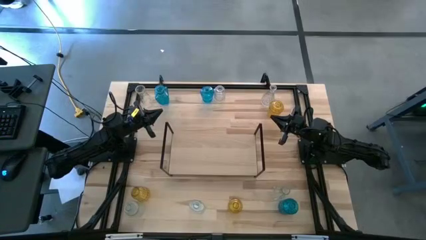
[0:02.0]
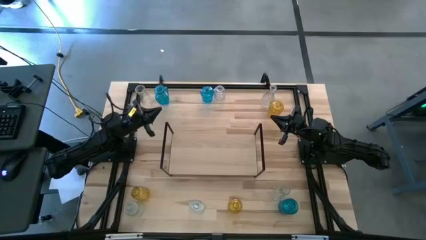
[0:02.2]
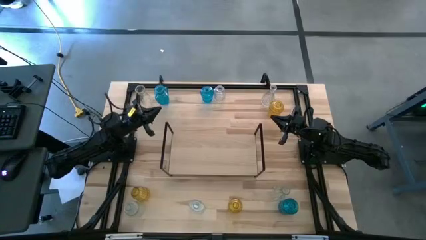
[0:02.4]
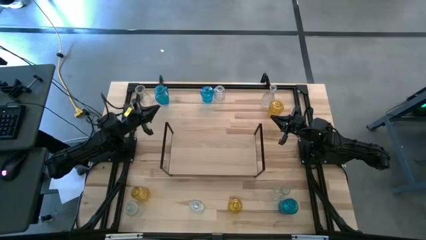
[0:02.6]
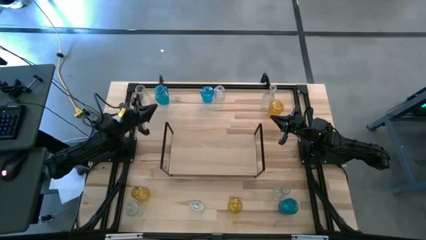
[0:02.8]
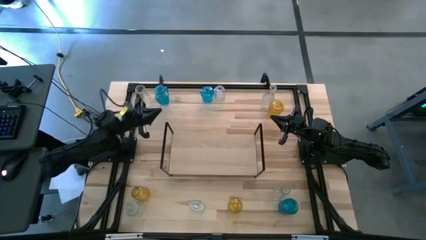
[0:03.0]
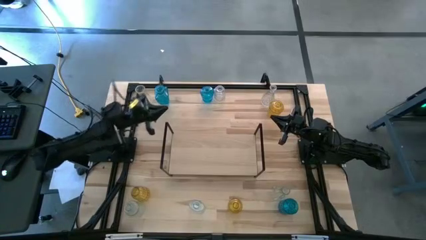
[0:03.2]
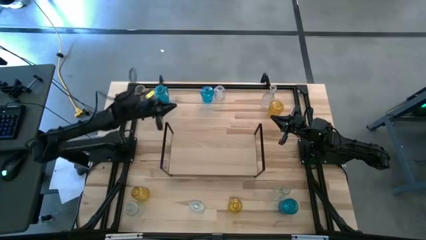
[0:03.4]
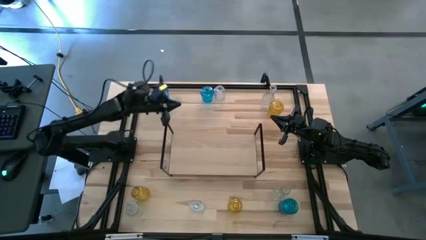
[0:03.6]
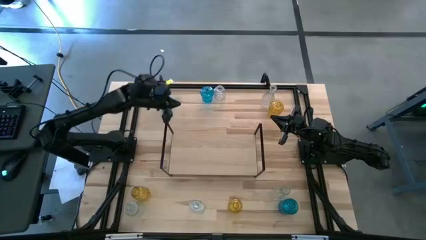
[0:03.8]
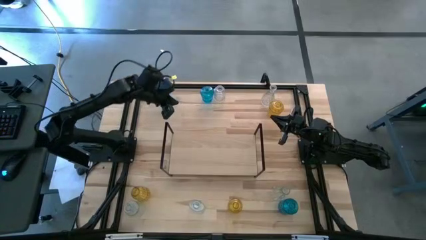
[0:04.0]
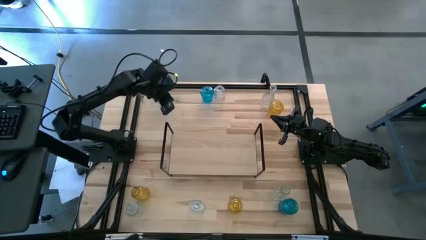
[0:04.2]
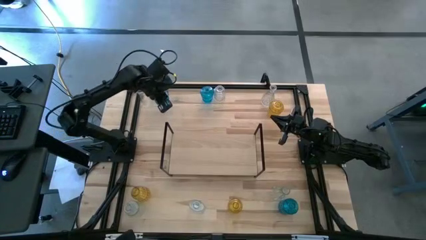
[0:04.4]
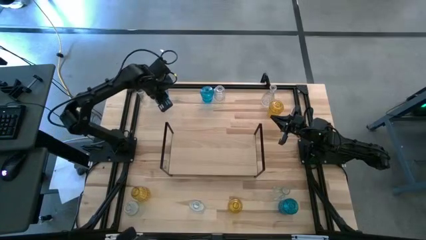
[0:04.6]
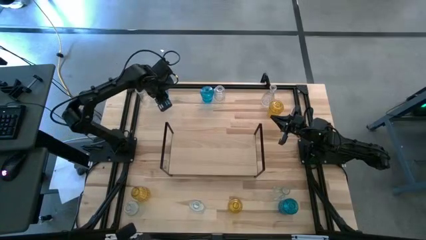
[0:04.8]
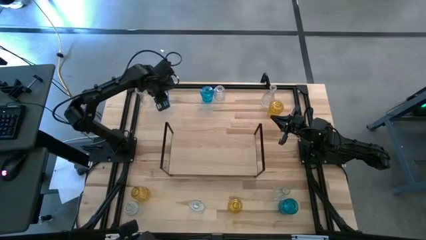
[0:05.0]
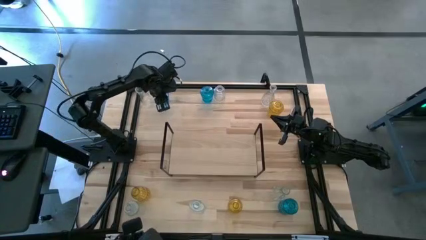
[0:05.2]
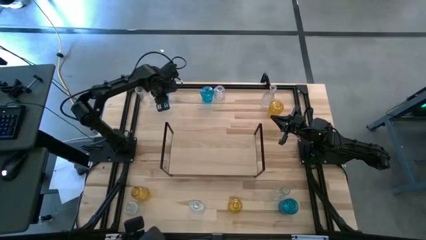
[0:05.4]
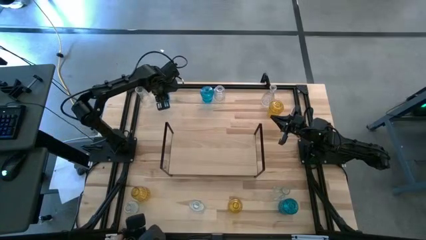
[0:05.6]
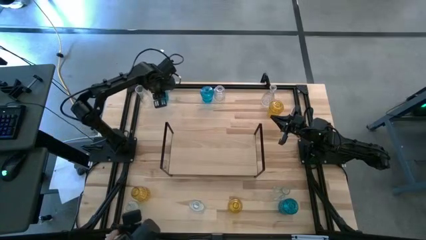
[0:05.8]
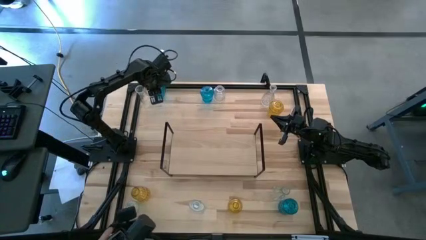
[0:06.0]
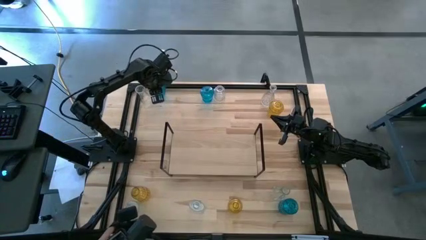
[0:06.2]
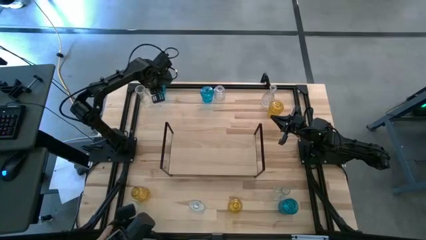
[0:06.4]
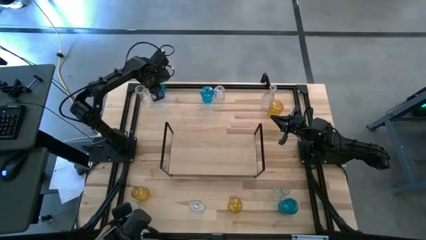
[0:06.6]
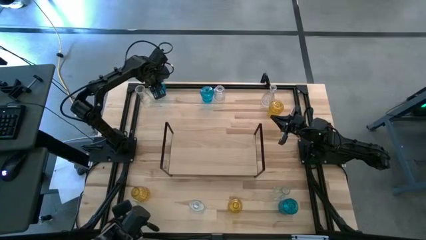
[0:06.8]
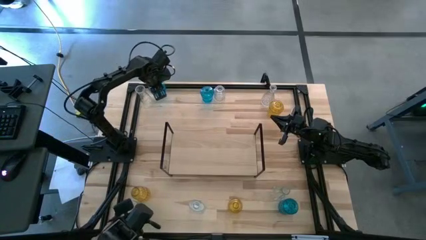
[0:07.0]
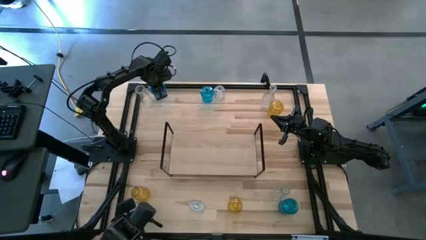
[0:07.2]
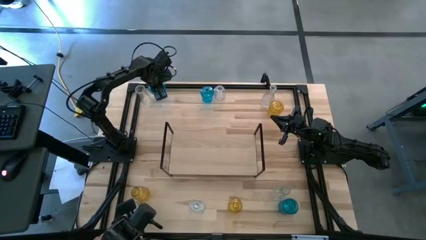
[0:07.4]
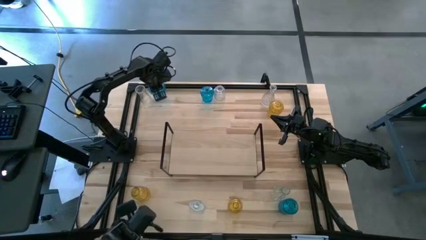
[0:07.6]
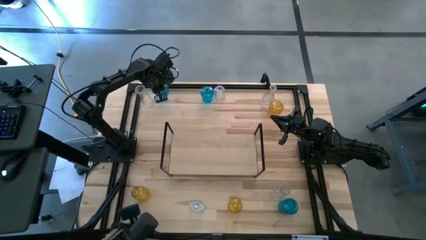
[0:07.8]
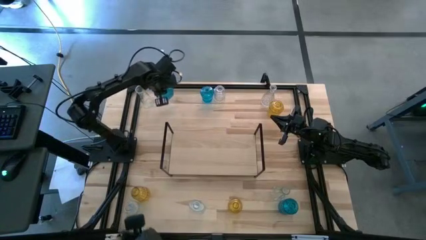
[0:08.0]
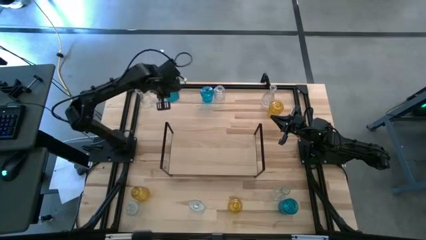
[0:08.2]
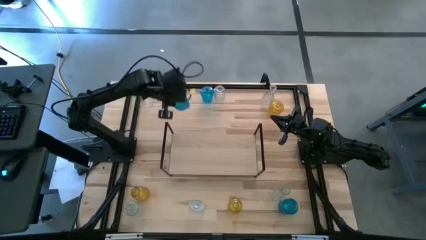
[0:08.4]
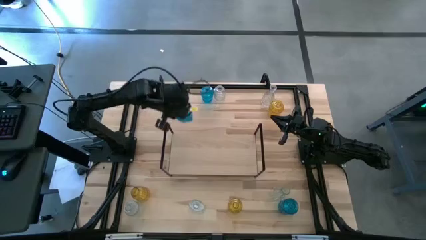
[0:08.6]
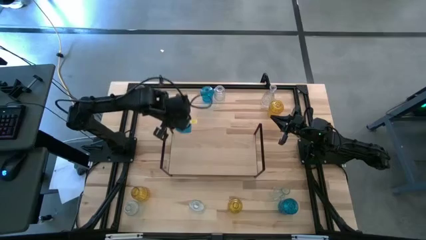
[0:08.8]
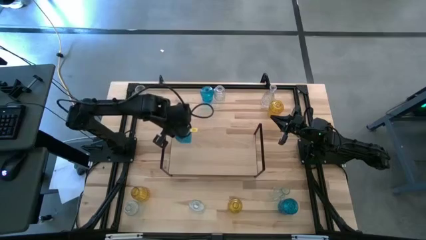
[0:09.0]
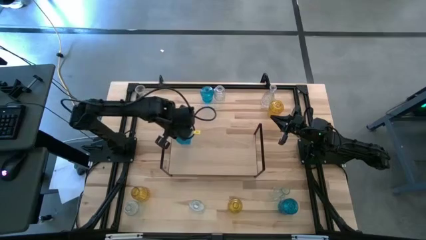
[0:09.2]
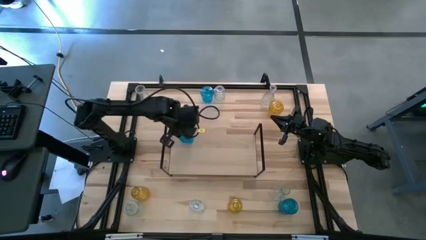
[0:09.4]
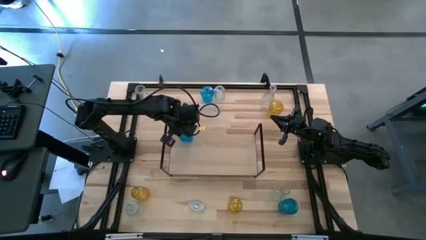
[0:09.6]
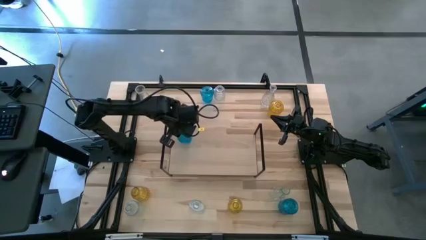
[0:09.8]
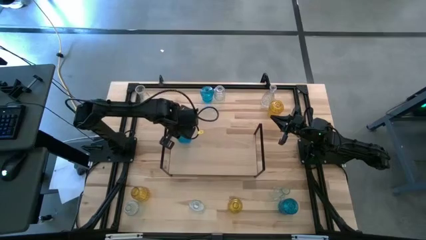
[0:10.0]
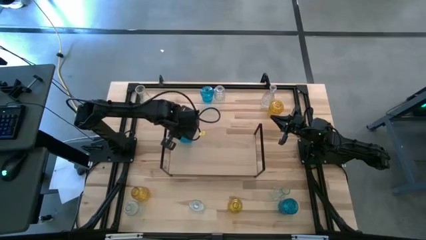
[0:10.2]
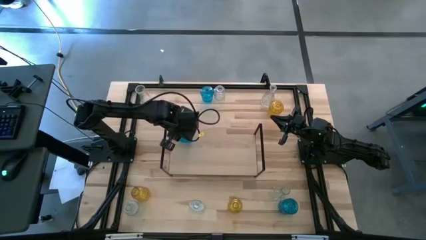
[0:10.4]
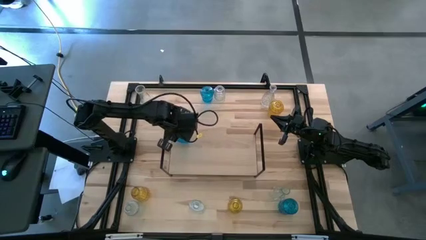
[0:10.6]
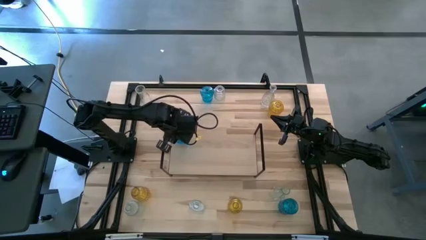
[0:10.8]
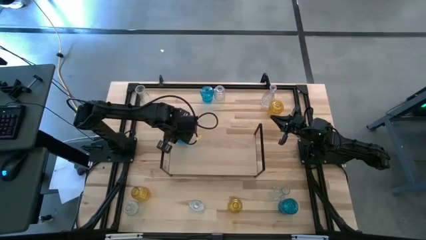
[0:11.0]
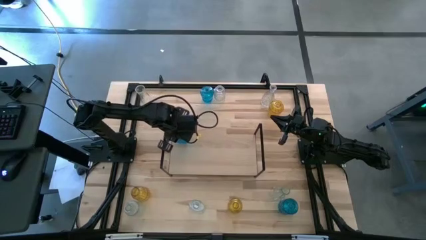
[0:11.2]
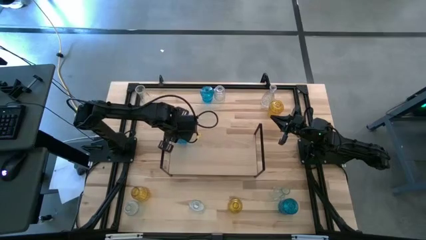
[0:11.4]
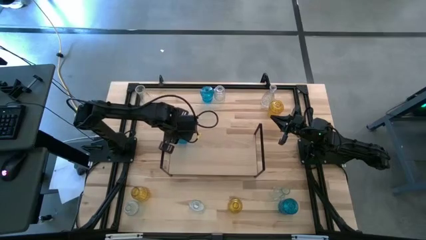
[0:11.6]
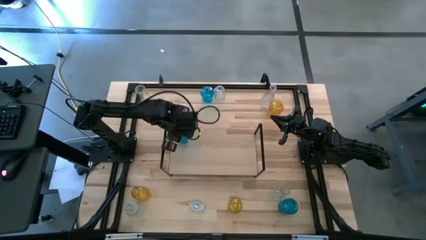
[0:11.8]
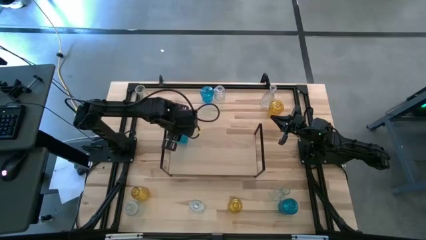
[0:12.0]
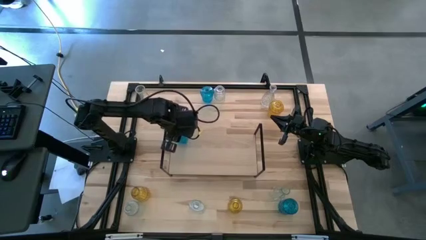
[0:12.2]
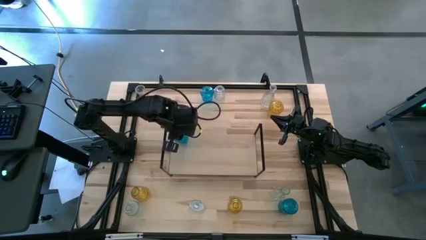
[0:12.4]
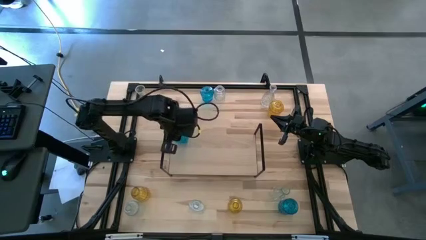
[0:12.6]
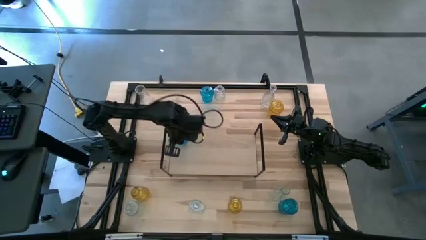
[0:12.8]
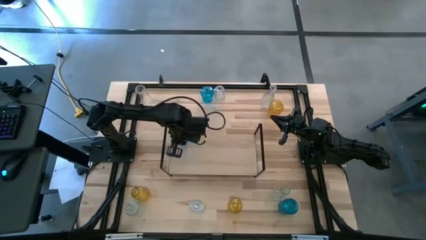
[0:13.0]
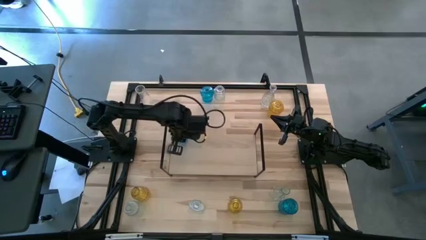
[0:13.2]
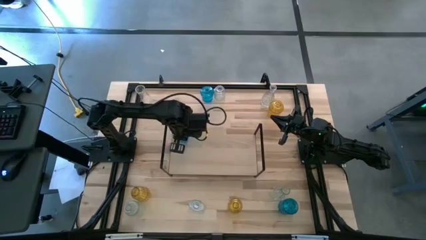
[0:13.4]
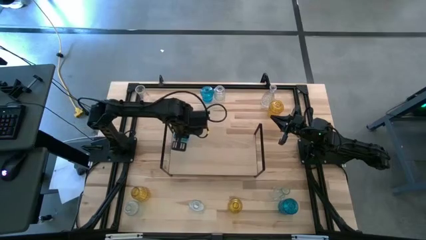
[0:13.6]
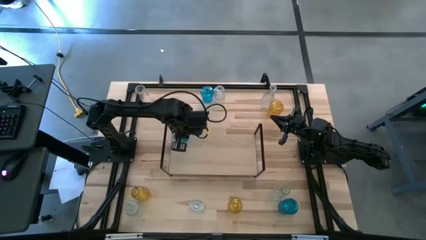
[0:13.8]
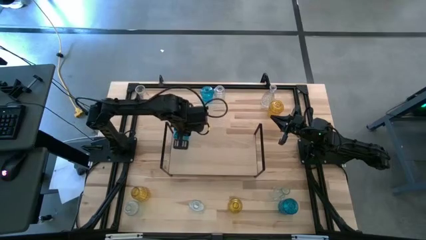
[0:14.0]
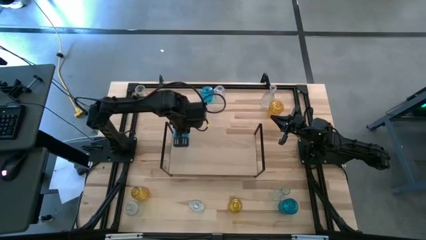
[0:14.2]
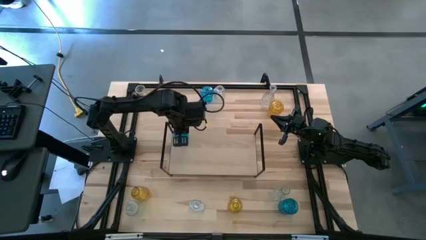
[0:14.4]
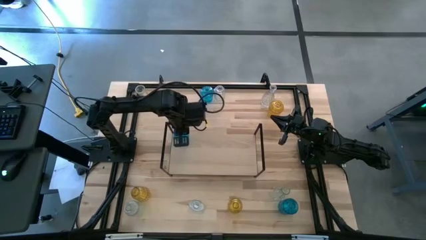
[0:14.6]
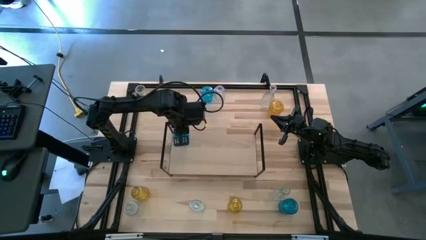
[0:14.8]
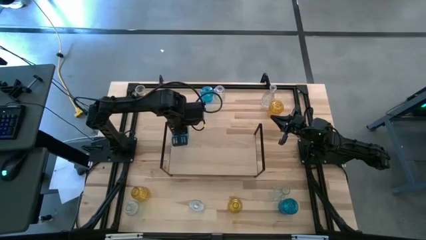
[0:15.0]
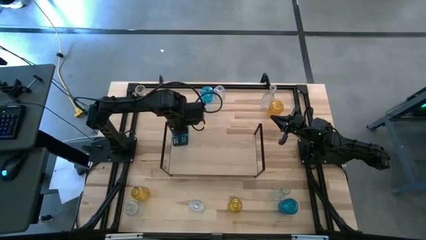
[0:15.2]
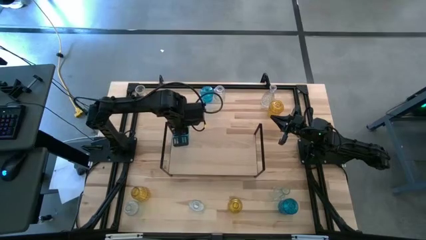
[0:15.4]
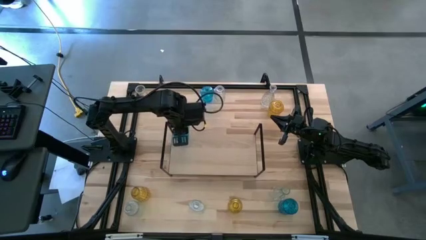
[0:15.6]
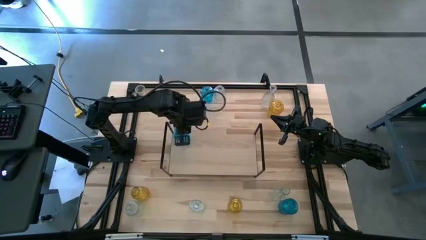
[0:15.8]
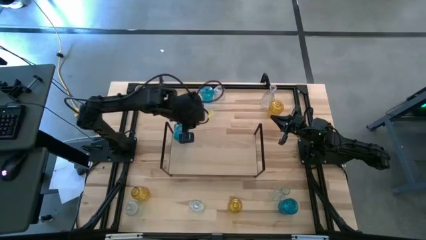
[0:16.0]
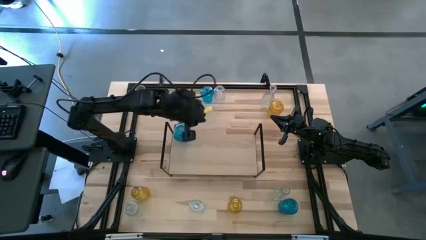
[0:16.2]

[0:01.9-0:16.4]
Task: sort vases onto shelf
Put the top left blue vase on the shelf

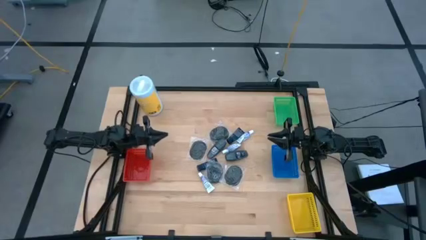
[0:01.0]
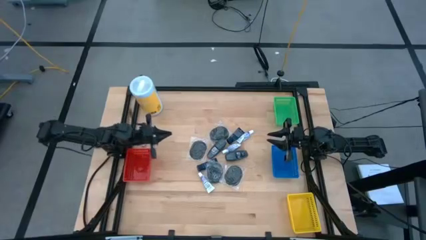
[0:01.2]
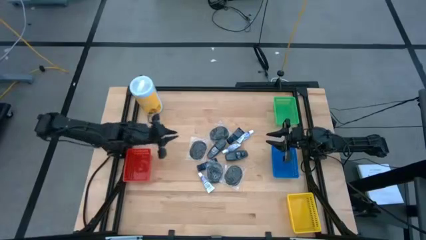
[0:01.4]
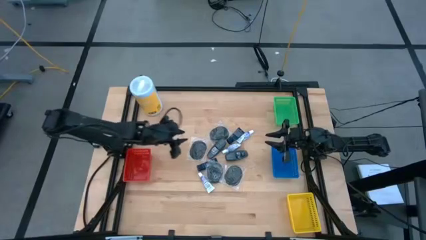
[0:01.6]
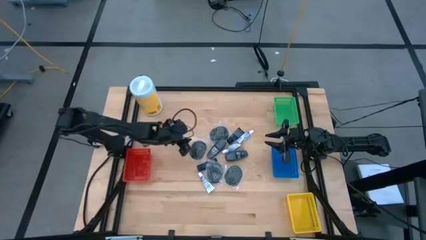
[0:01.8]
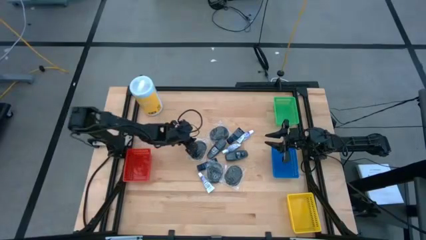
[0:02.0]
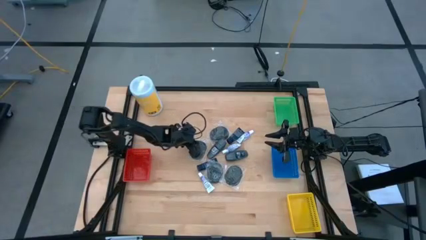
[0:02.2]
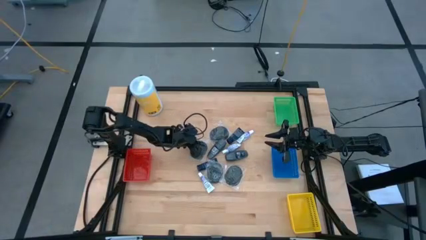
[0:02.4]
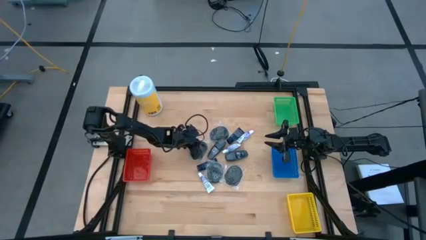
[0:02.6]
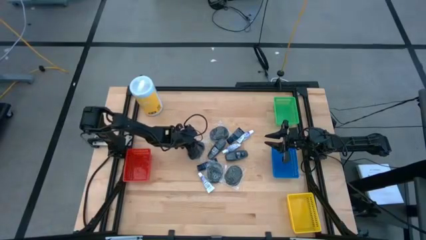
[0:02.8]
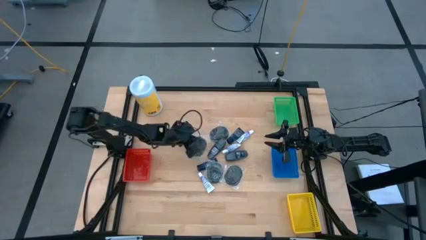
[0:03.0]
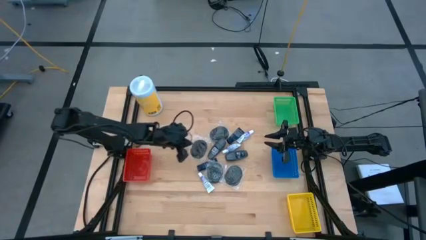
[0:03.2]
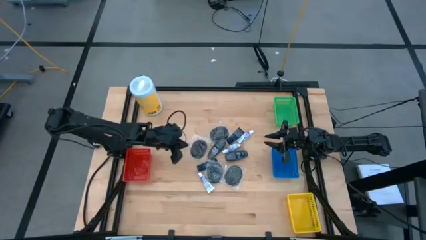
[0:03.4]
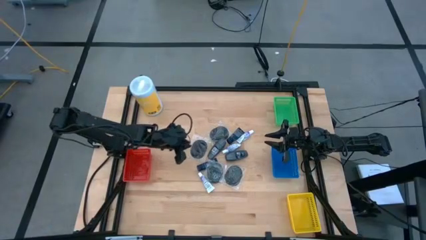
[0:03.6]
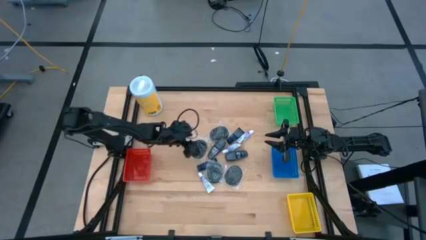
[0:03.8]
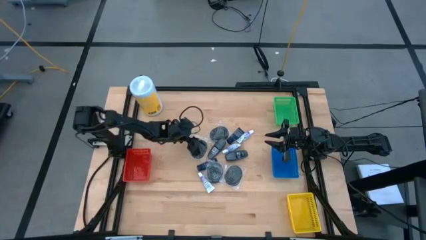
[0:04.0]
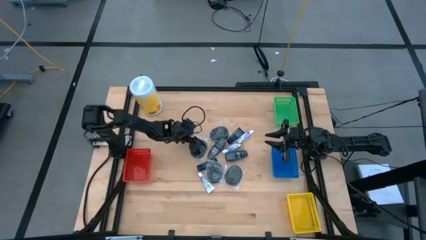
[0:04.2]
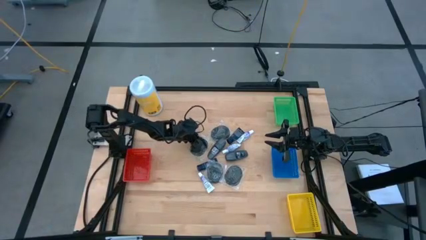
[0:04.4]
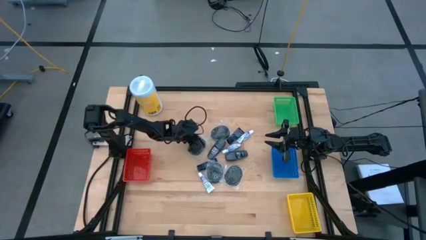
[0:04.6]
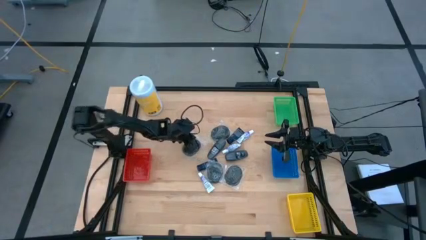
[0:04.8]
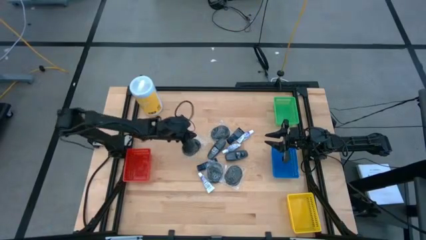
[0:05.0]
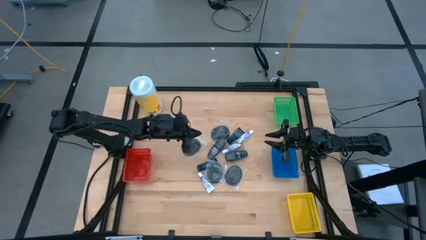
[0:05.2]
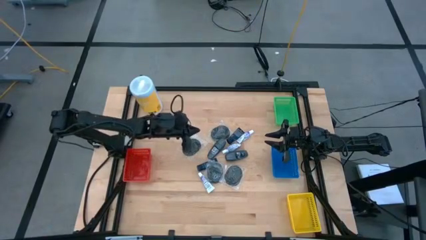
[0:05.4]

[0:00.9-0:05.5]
Task: Pick & Place Travel size toiletries
Put the hair comb into the red bin
